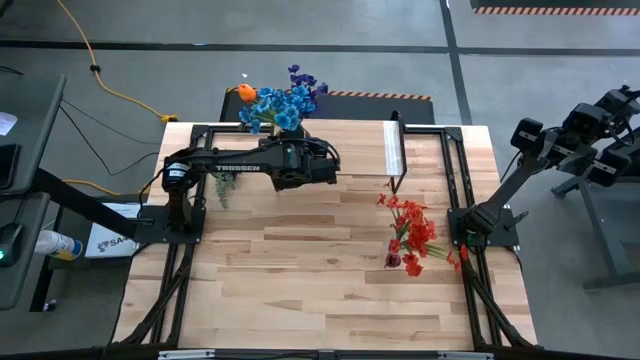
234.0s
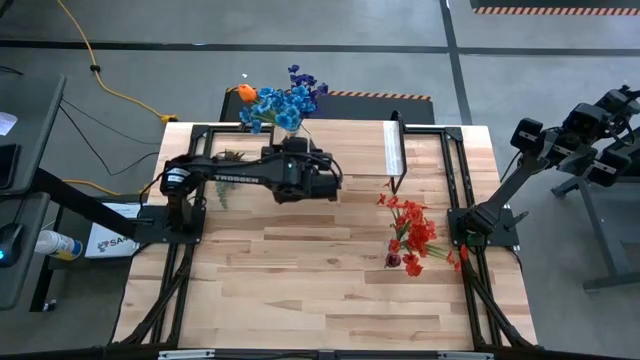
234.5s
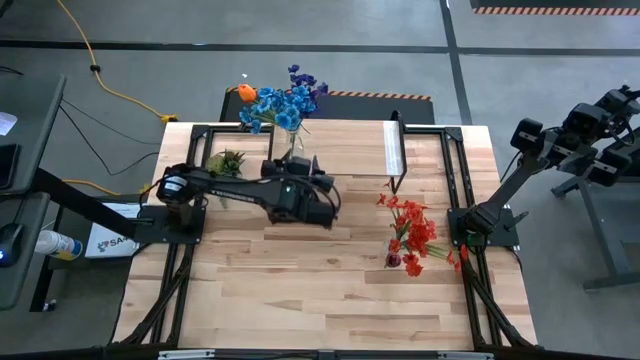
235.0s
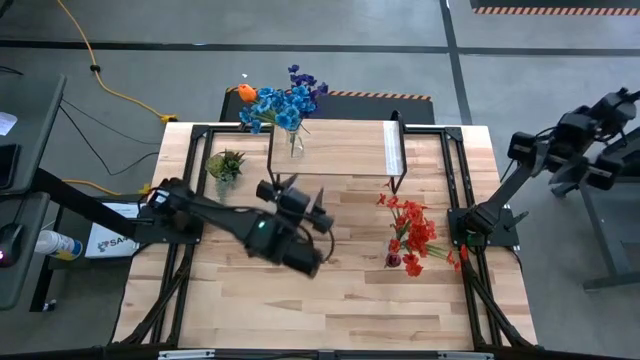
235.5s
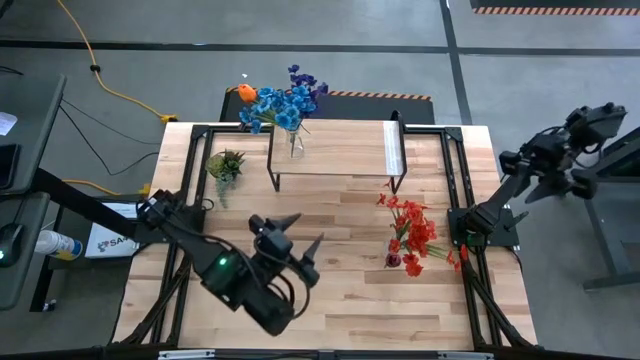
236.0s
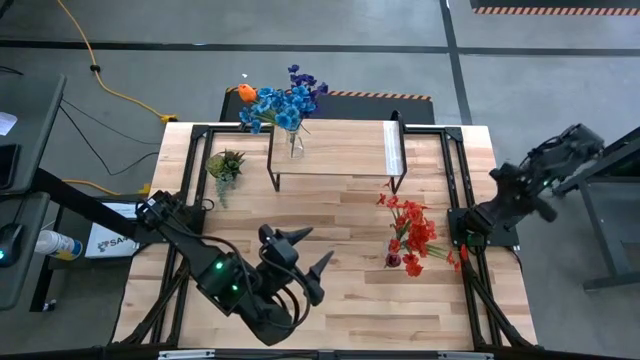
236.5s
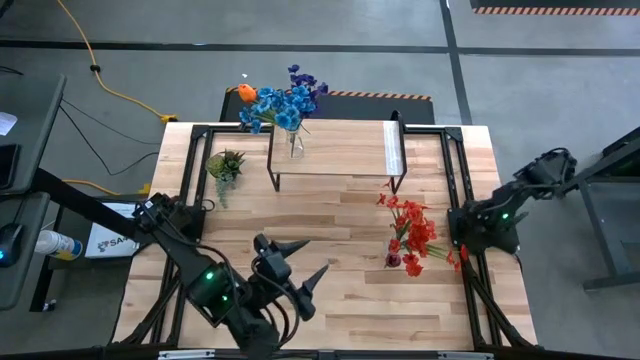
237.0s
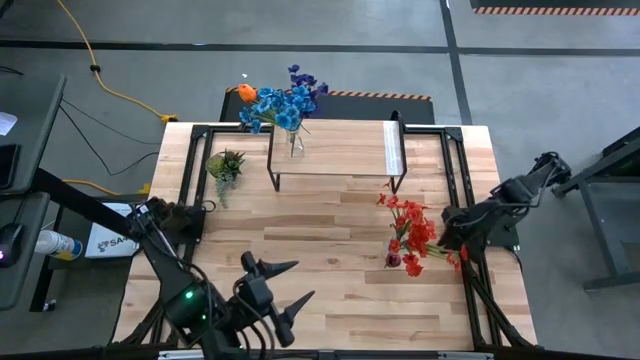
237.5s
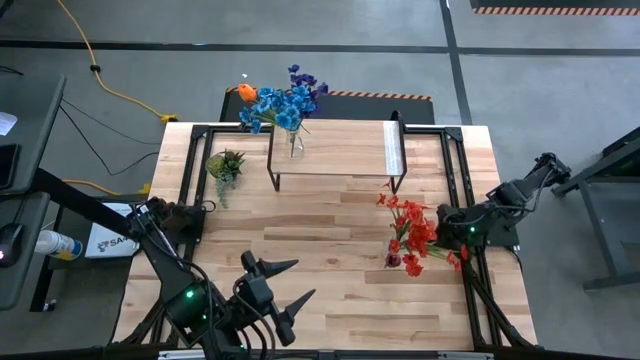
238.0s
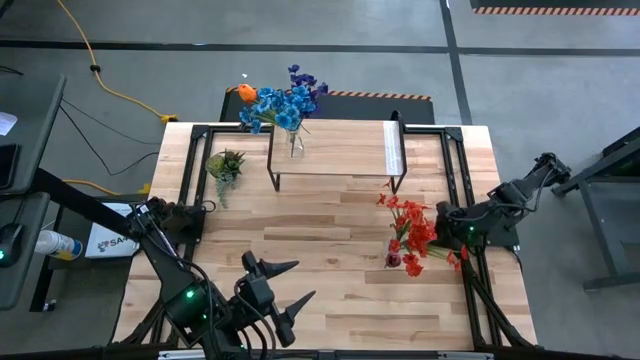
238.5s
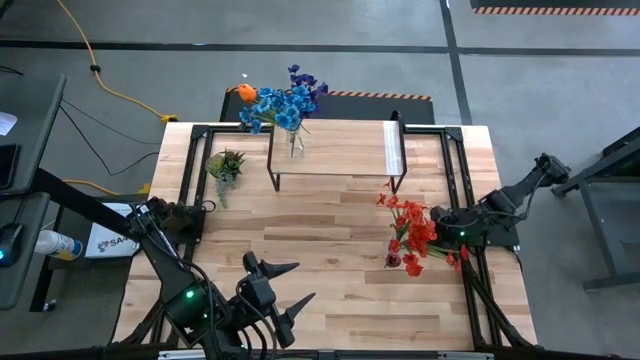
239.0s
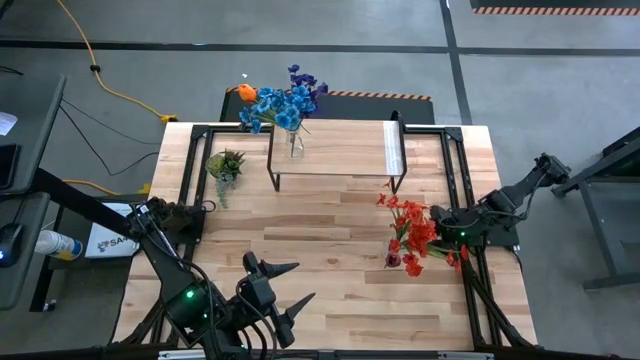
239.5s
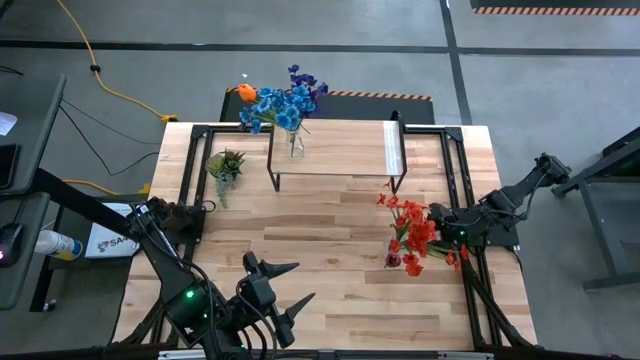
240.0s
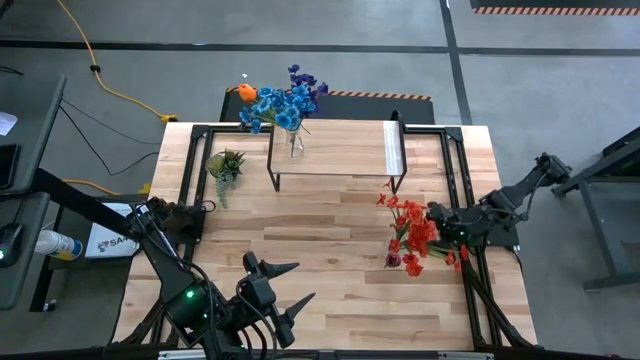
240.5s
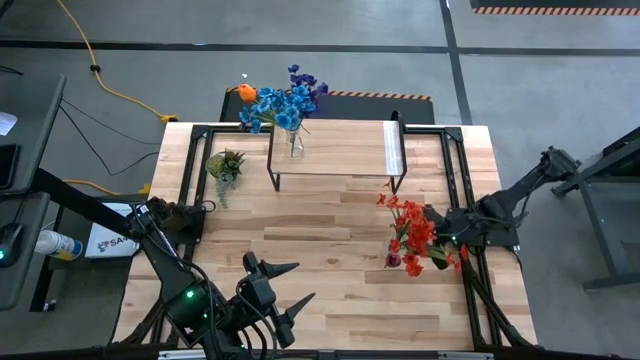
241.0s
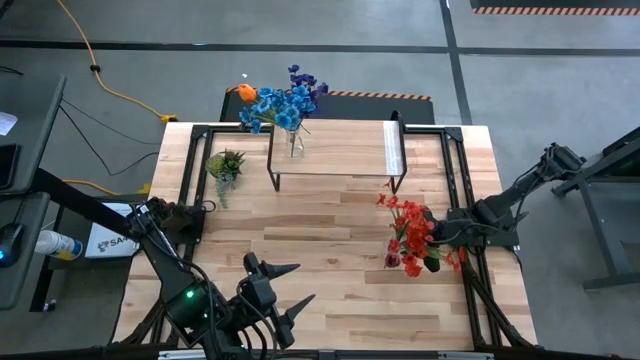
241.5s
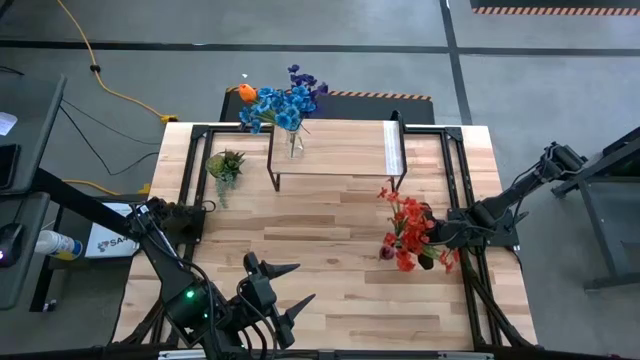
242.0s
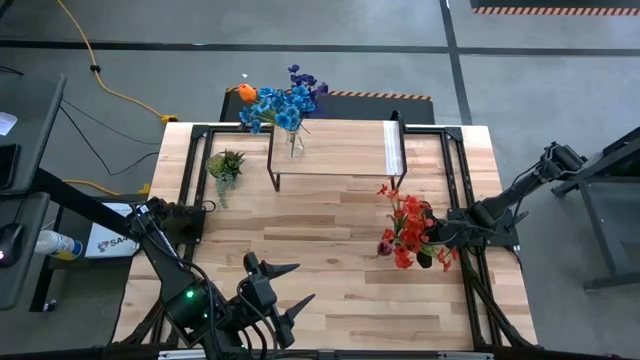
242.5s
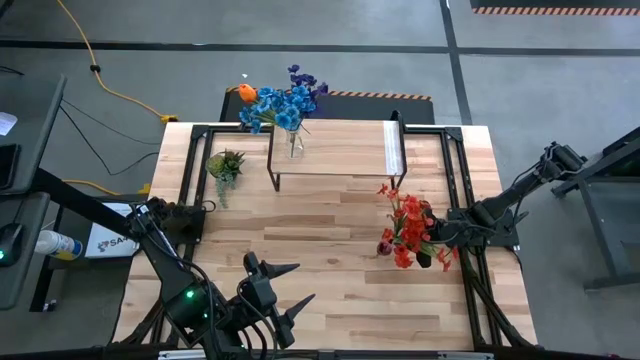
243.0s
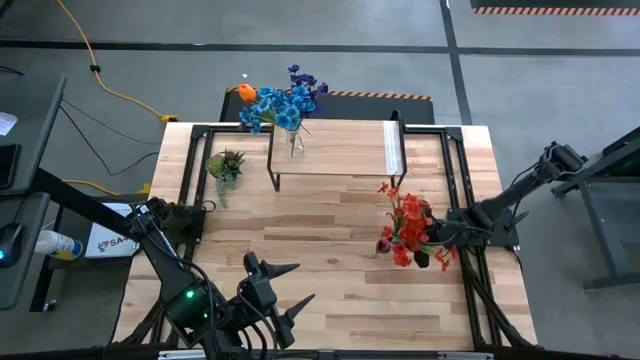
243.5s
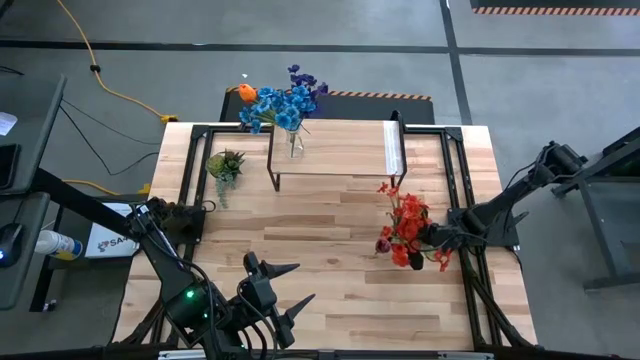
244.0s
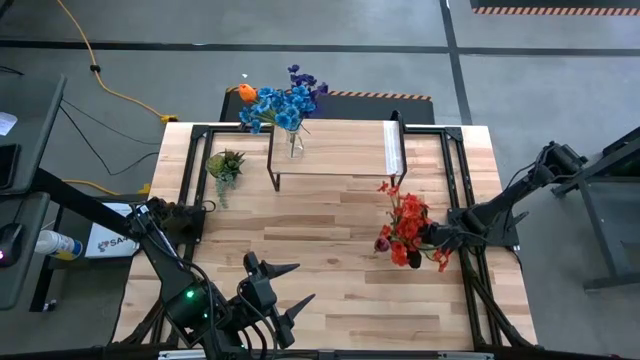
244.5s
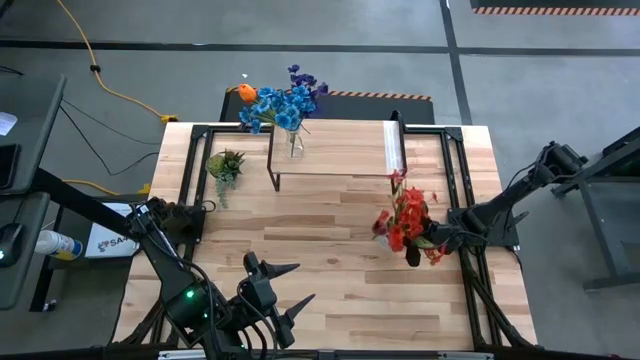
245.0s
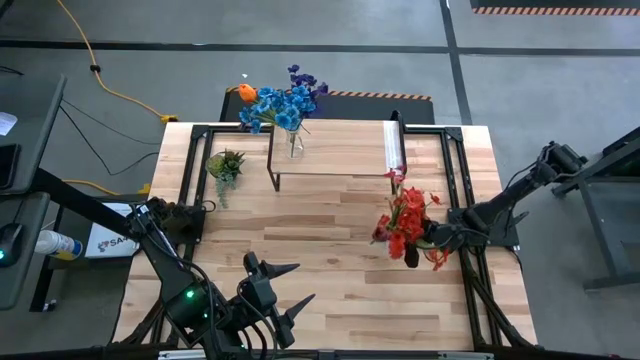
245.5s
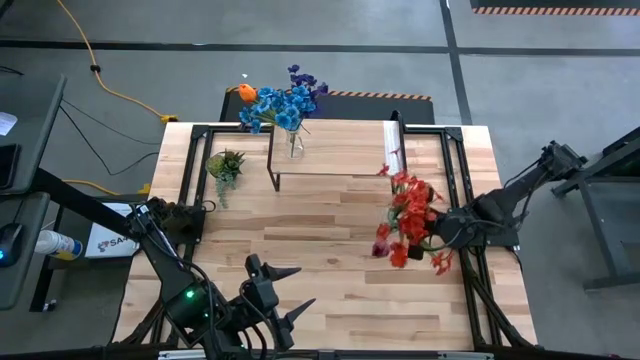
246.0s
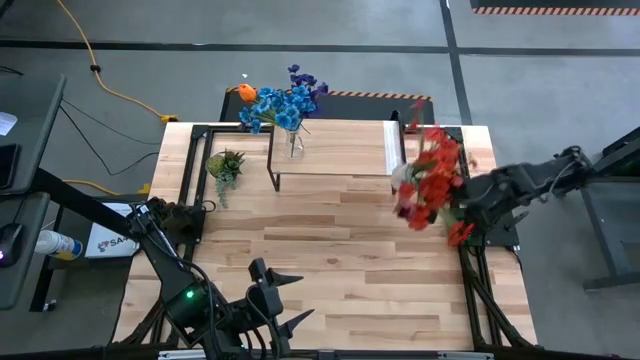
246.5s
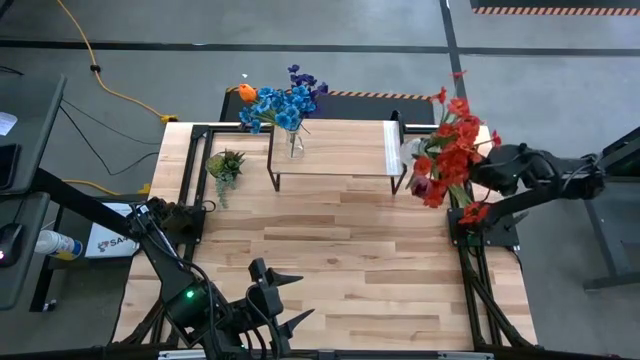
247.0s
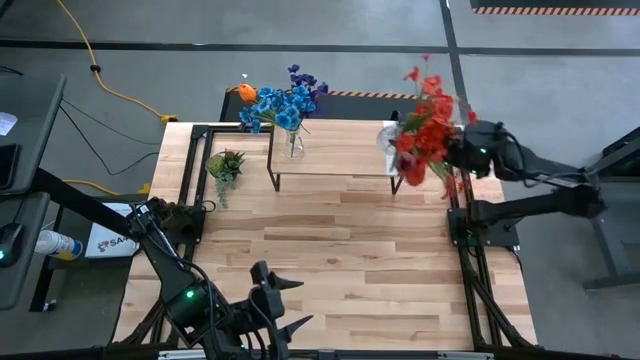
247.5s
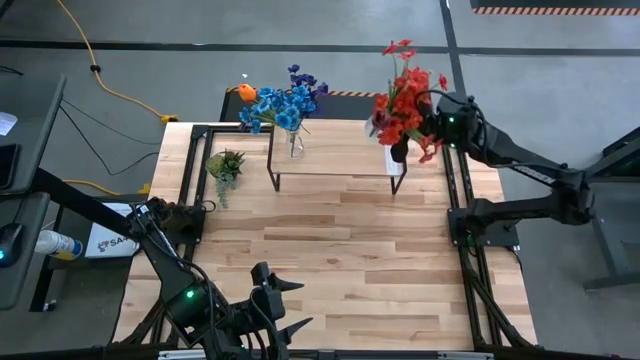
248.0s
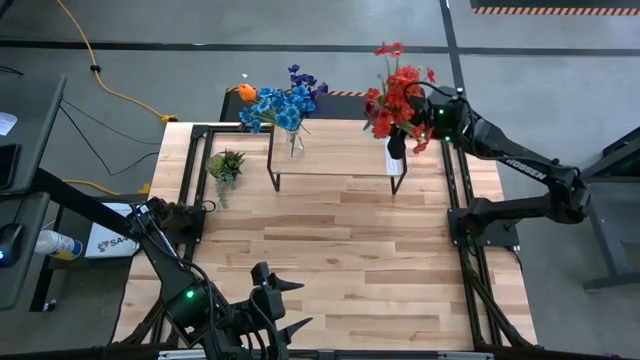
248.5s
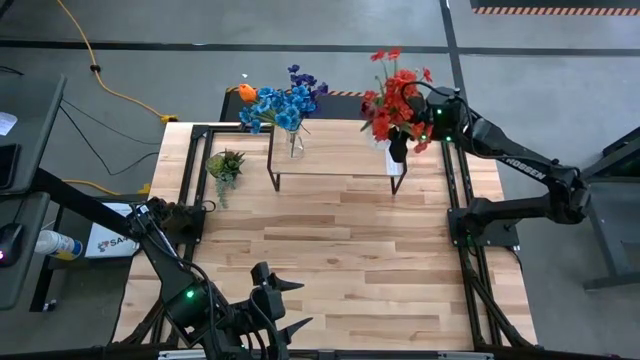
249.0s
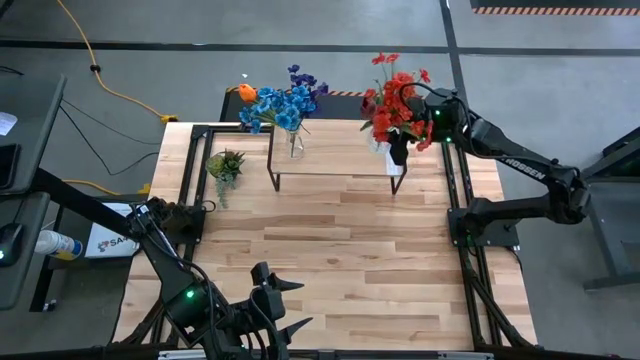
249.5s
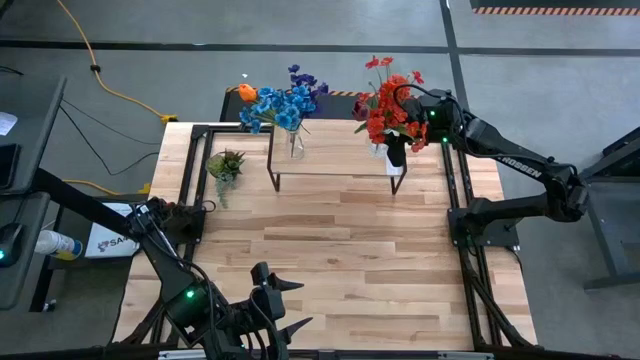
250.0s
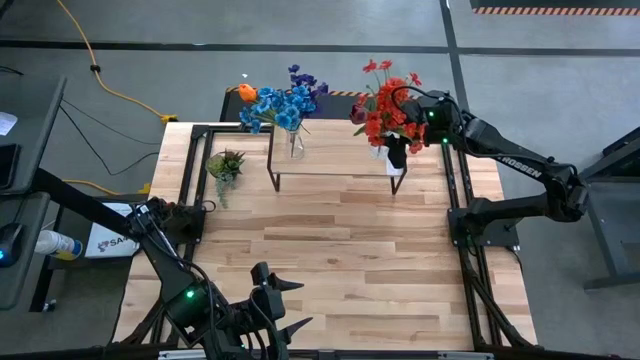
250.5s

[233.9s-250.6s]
Task: Pick and place flowers into a vace then onto a shelf
Put the right flowers transparent vase on the shelf

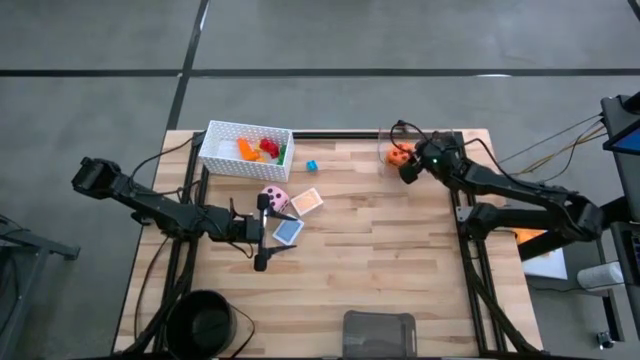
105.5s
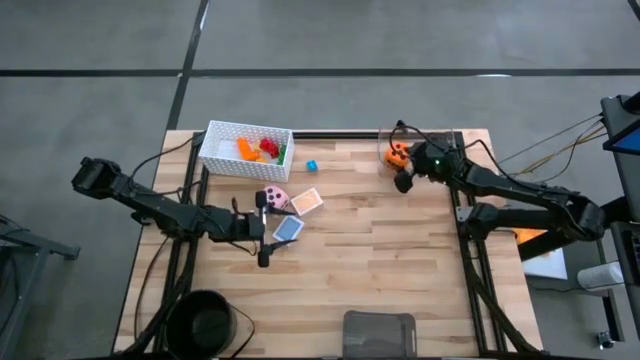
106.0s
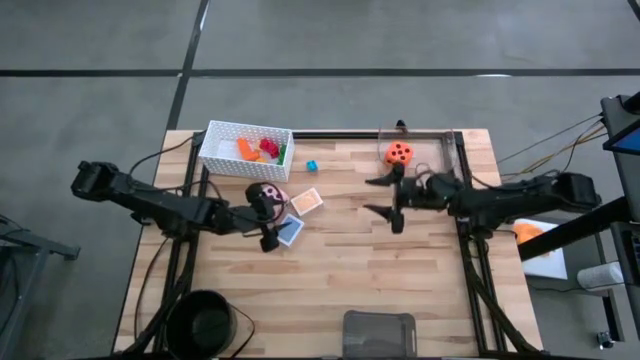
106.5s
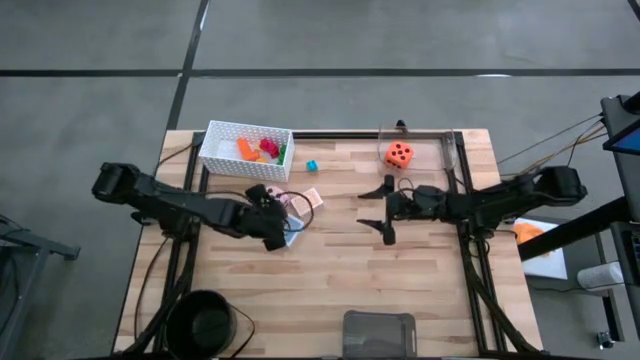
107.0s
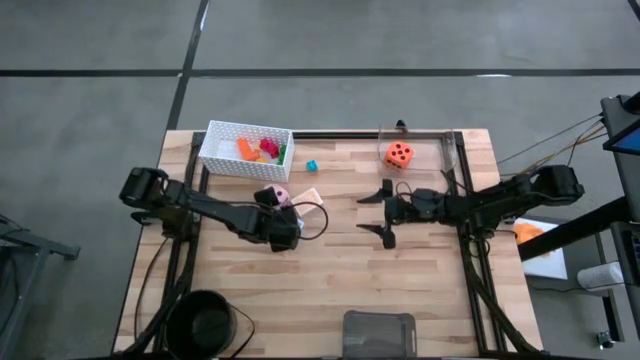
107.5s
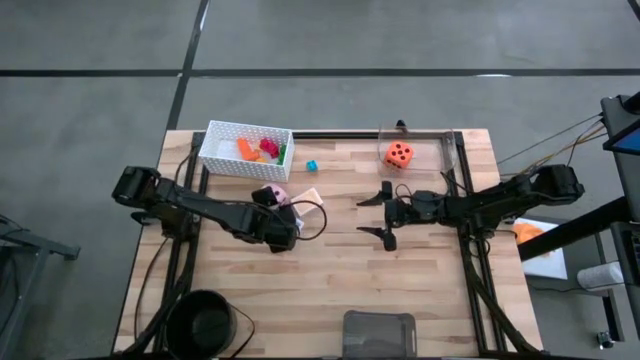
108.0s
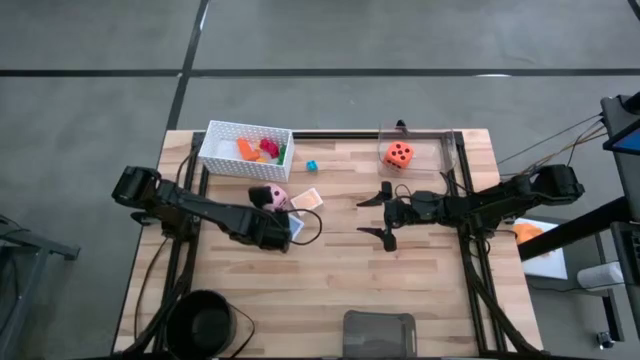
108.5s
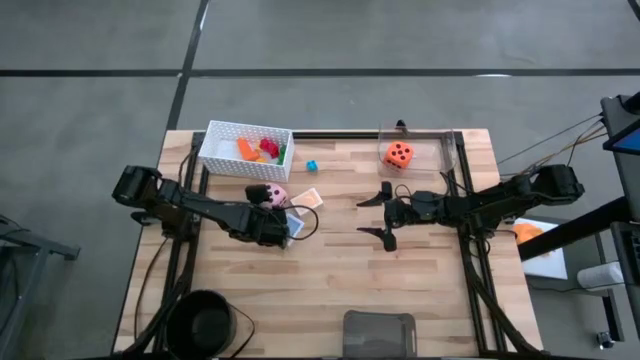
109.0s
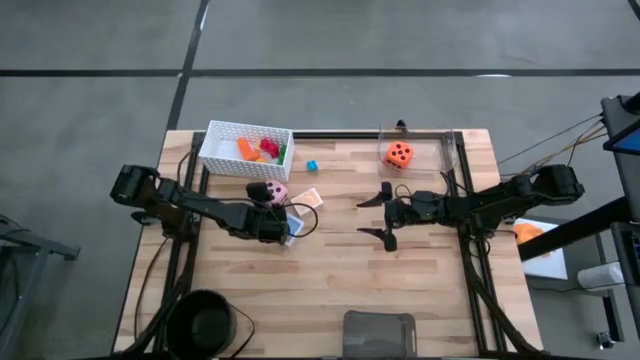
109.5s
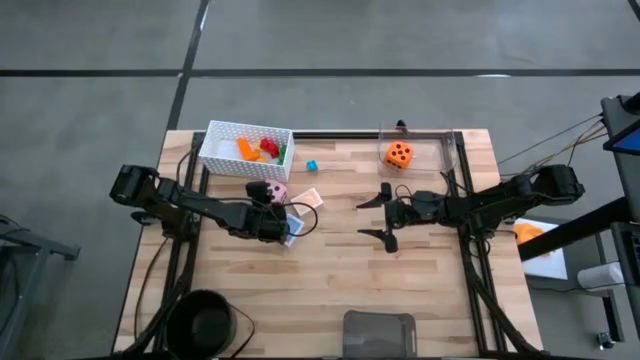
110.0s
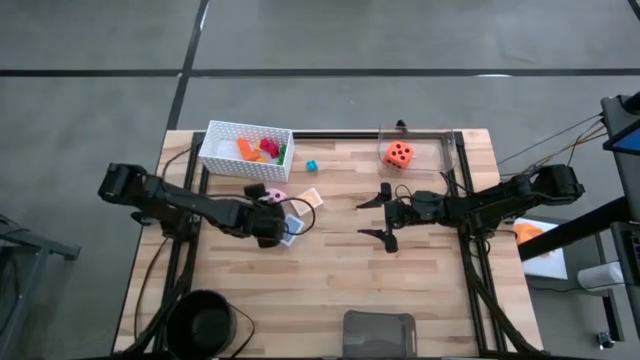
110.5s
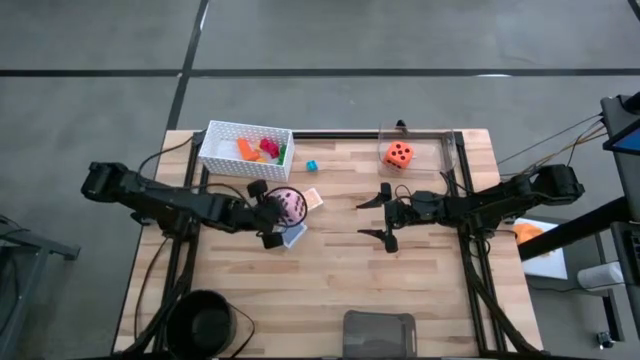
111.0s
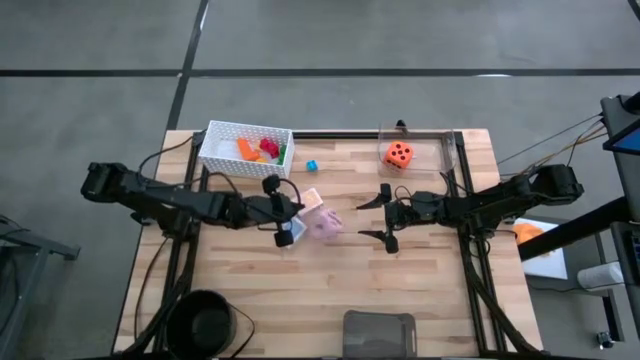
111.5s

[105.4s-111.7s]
Task: Pick & Place Toys
Put the pink dice into the transparent bin
